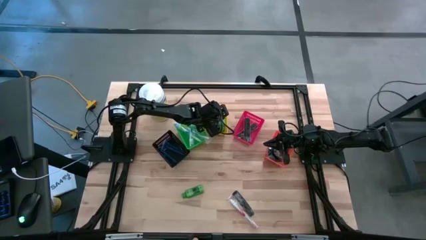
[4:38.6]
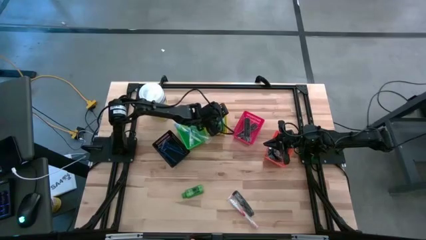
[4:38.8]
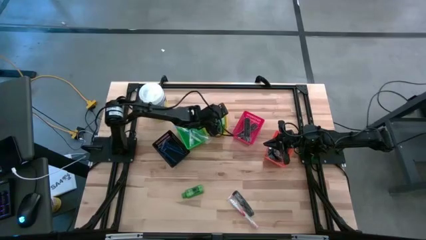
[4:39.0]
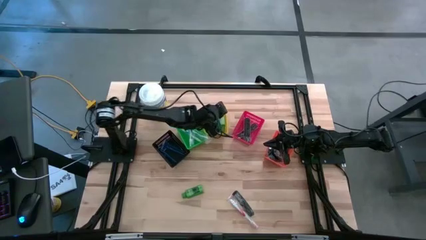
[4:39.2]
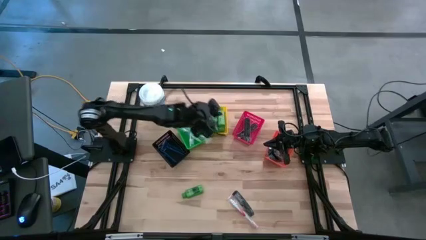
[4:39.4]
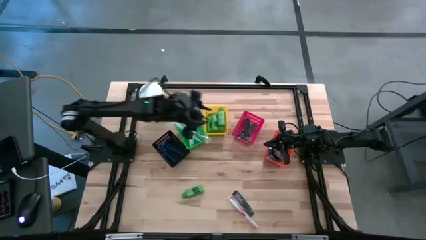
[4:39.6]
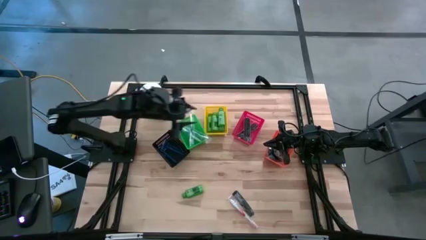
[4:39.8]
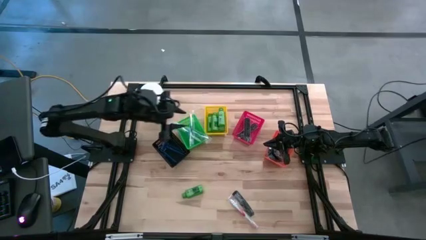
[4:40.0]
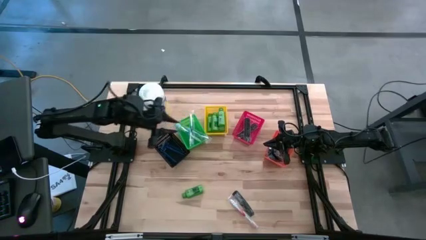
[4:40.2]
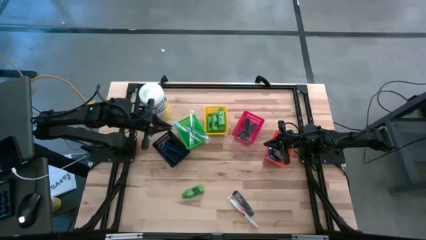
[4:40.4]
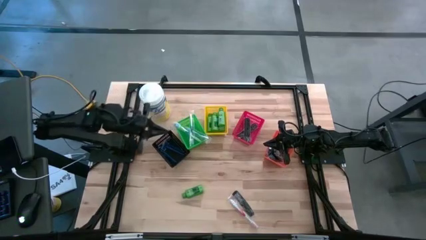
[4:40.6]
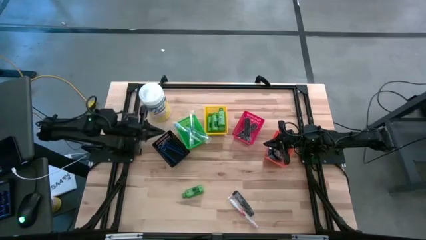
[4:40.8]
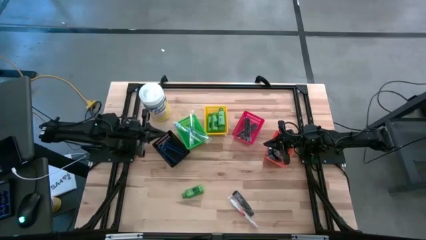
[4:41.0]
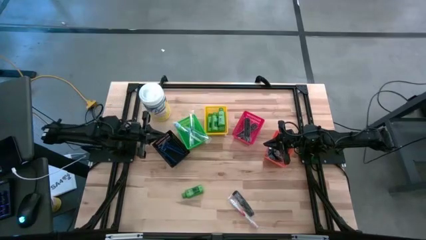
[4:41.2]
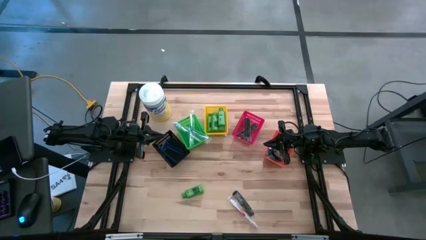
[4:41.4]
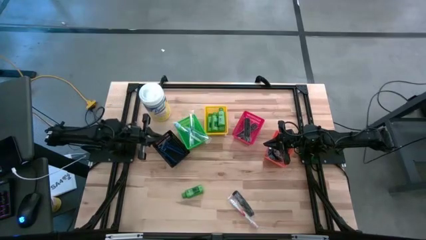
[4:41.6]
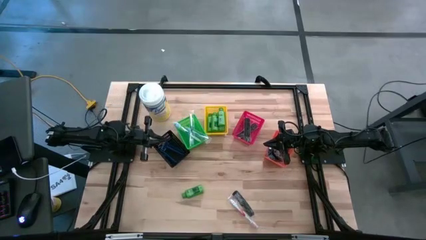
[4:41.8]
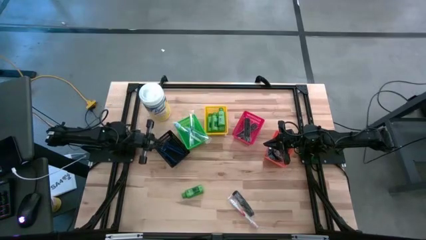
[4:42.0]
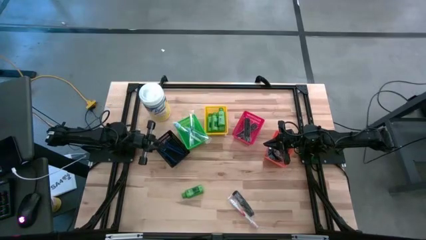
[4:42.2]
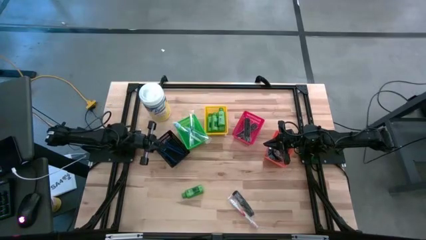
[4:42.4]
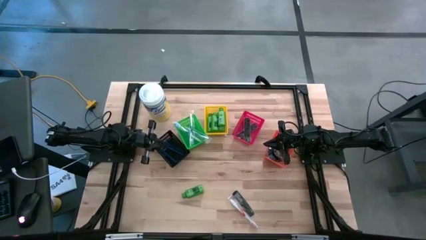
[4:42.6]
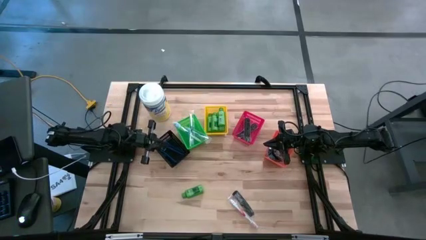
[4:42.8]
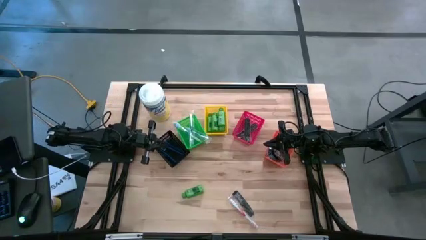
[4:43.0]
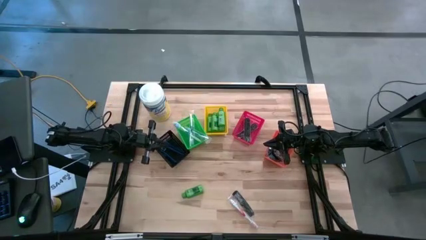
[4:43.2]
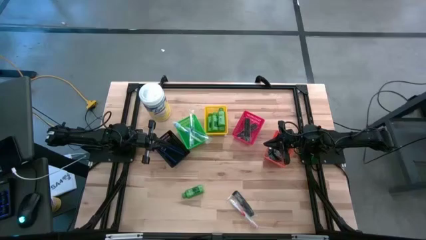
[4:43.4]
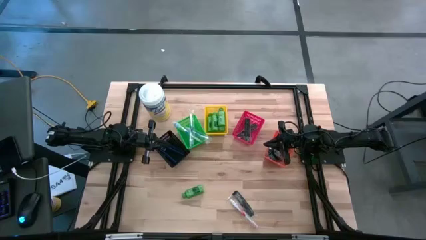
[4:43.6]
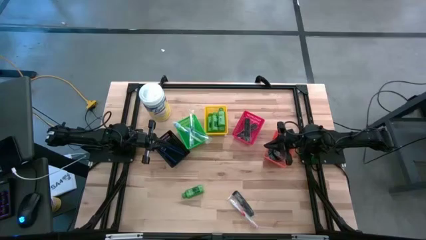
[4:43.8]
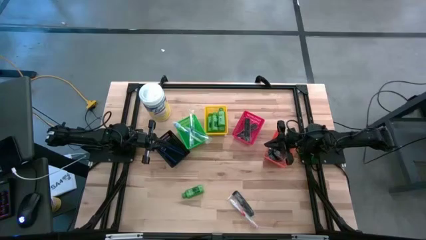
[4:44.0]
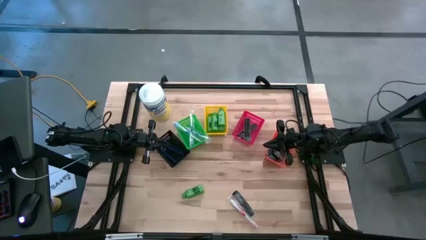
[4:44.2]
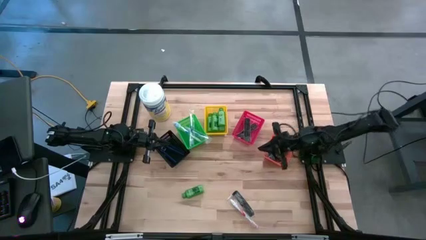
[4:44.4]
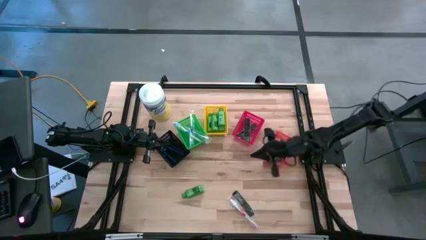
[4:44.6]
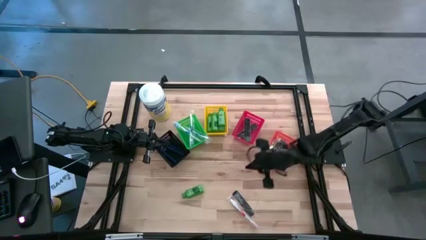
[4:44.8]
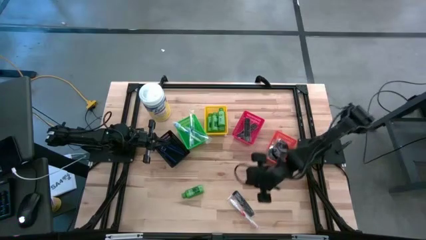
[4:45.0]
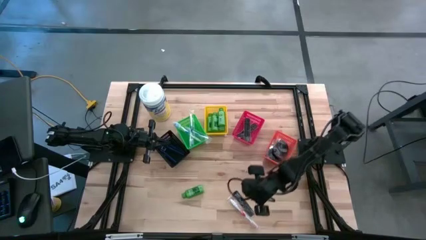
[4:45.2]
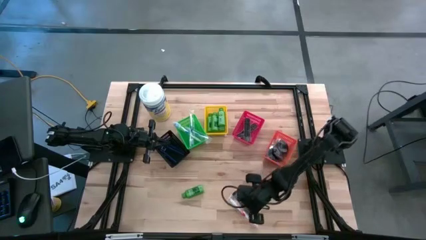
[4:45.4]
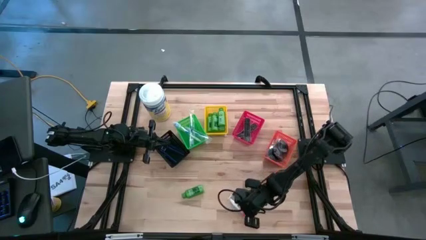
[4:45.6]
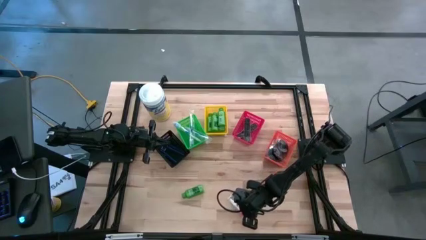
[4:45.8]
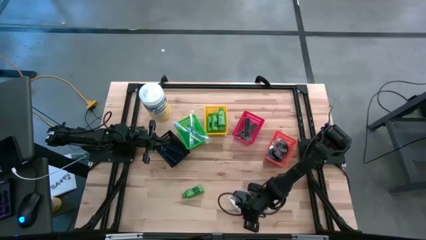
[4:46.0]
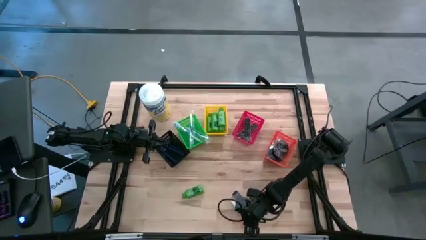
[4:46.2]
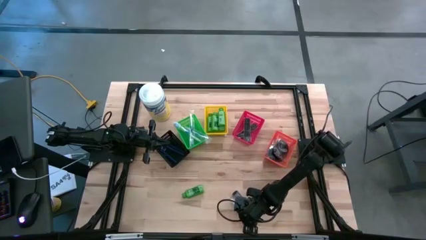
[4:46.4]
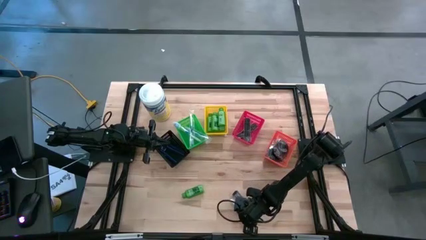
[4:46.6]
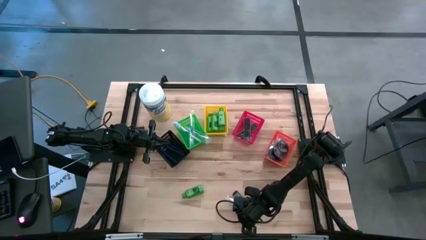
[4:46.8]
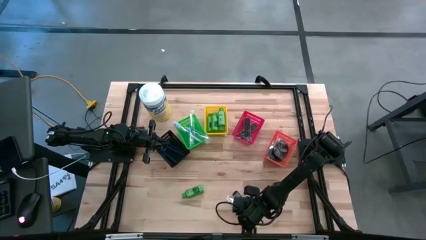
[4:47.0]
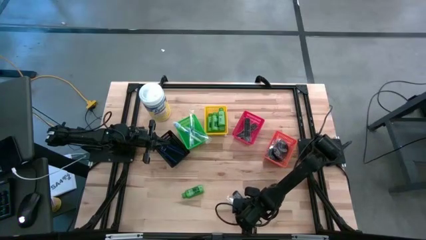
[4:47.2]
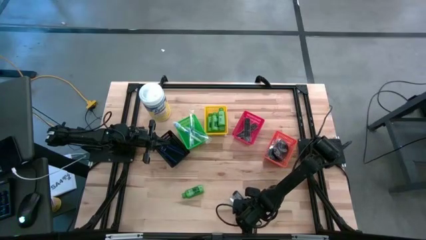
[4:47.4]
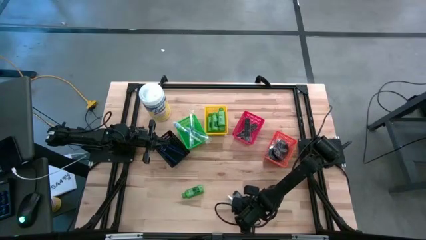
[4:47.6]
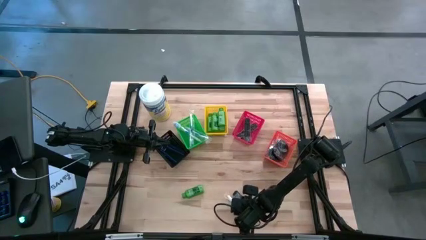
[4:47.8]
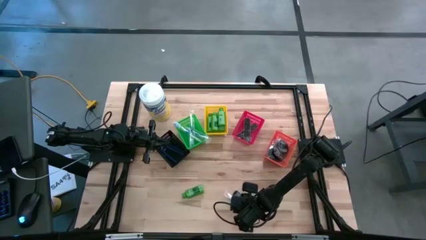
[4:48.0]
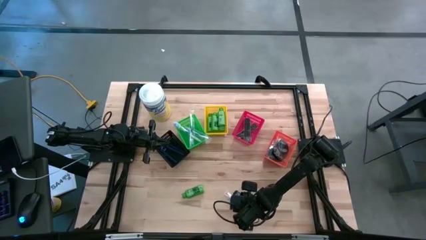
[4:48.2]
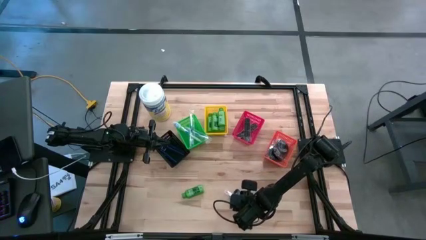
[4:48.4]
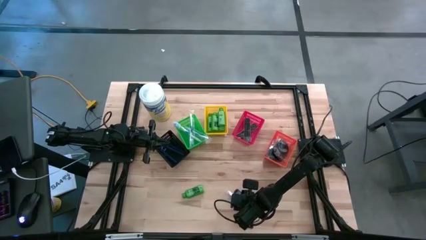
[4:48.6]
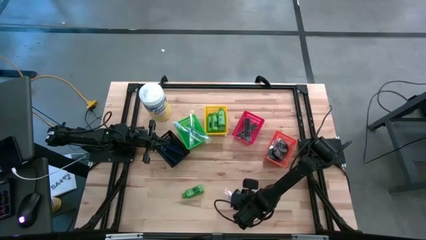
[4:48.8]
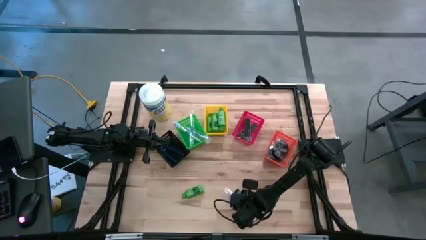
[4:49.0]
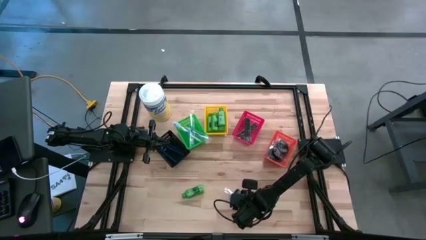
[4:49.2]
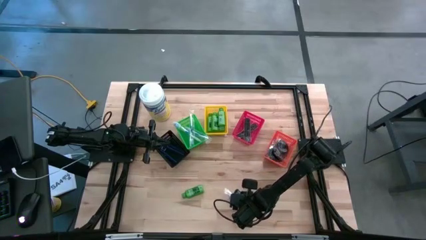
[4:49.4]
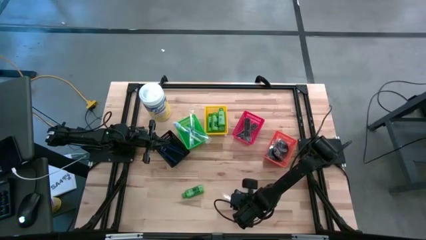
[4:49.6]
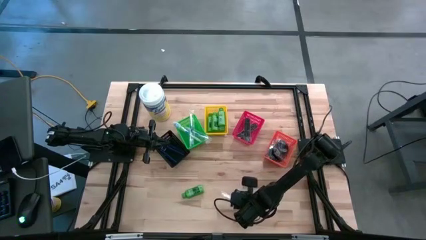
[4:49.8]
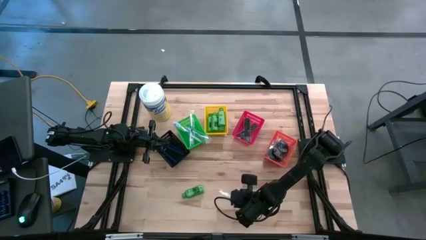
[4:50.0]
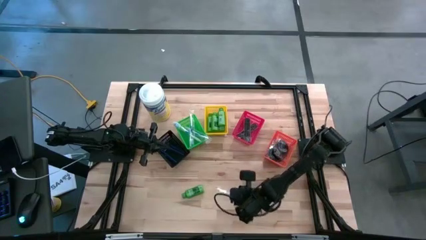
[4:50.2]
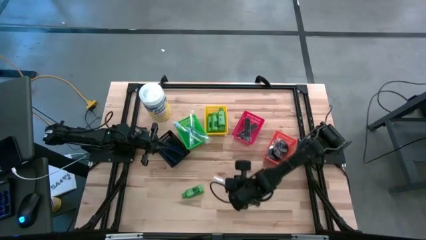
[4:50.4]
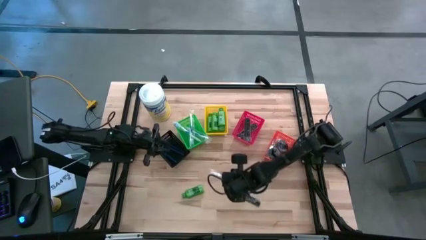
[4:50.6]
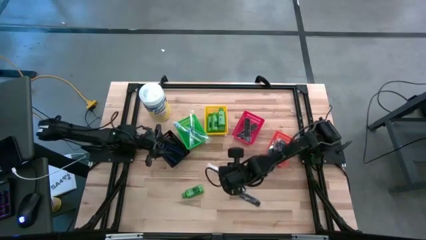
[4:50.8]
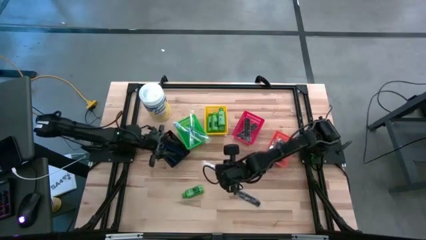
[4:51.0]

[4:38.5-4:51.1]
Task: Pick & Place Travel size toiletries
Put the orange toothbrush into the green bin
